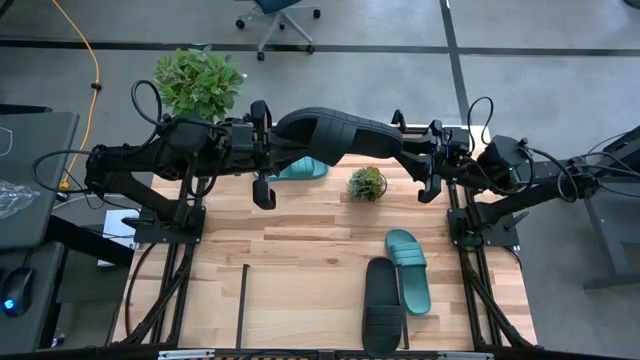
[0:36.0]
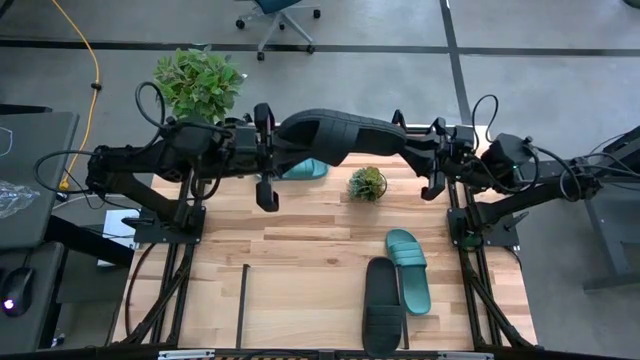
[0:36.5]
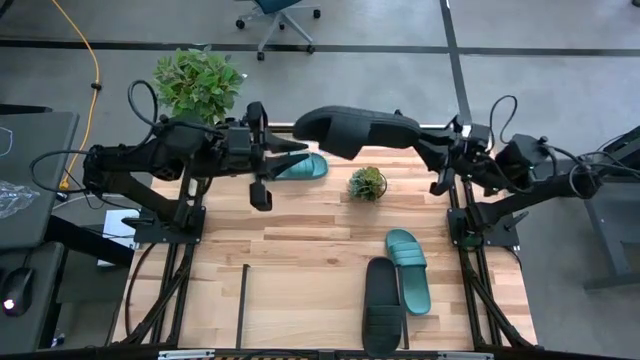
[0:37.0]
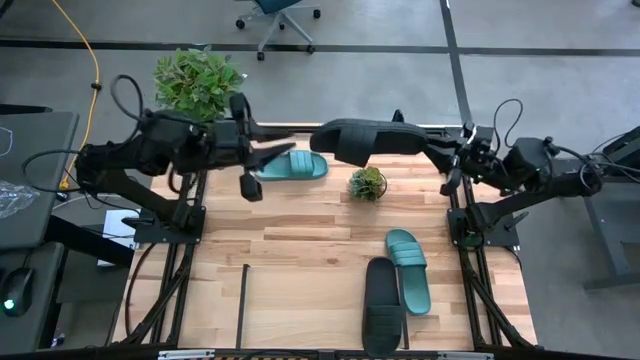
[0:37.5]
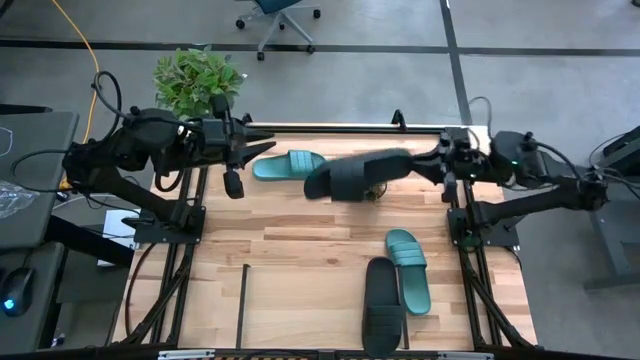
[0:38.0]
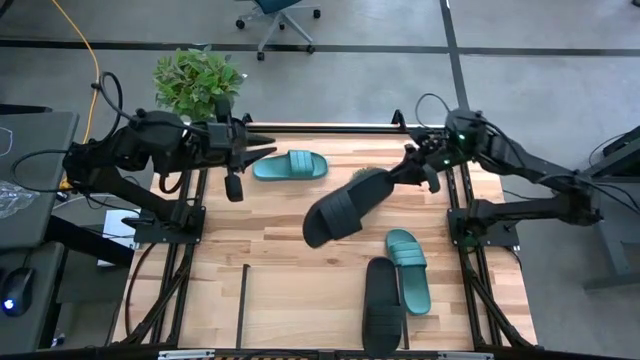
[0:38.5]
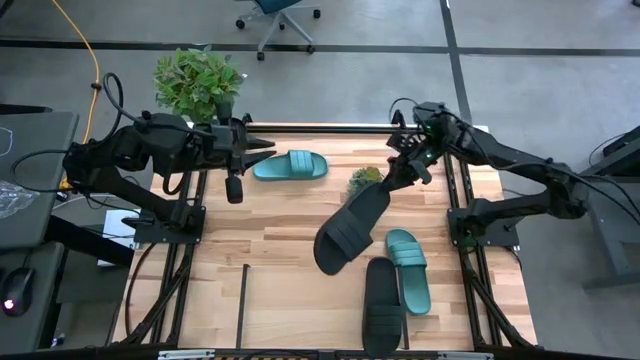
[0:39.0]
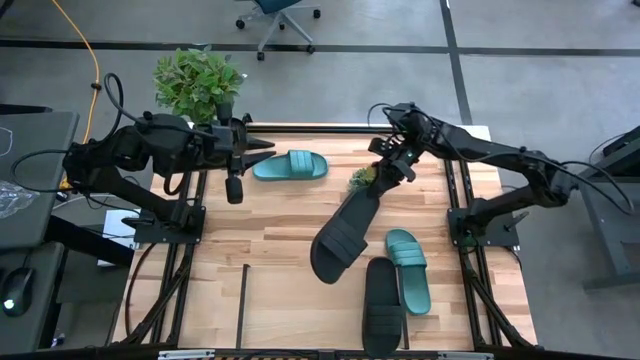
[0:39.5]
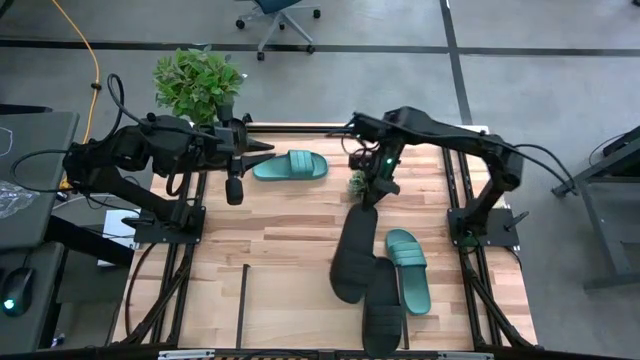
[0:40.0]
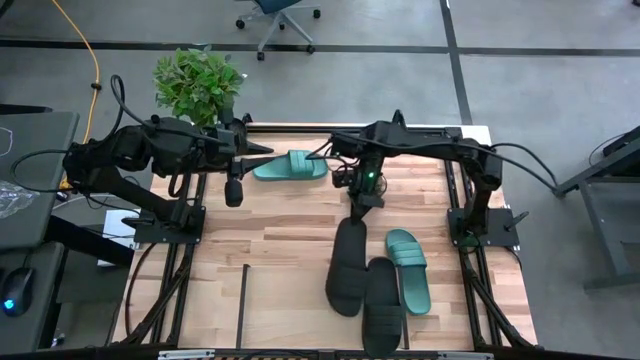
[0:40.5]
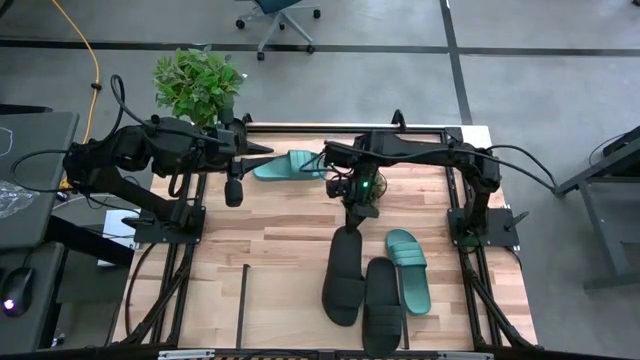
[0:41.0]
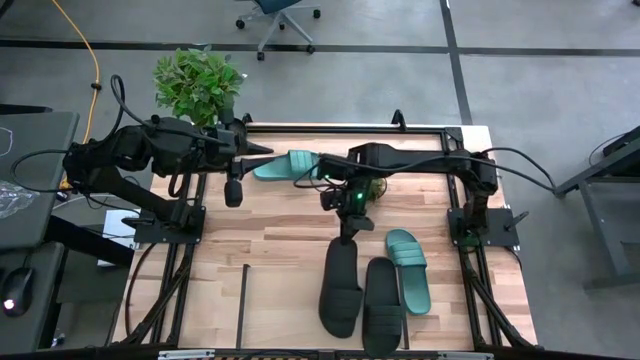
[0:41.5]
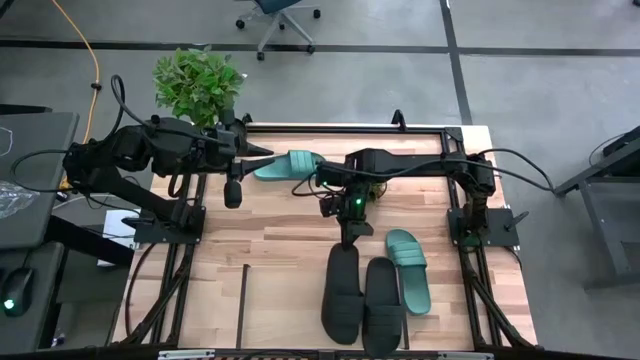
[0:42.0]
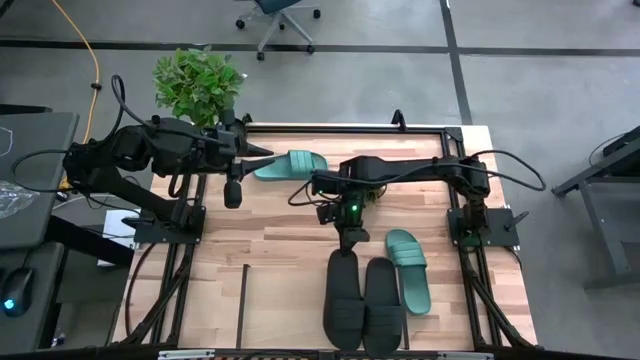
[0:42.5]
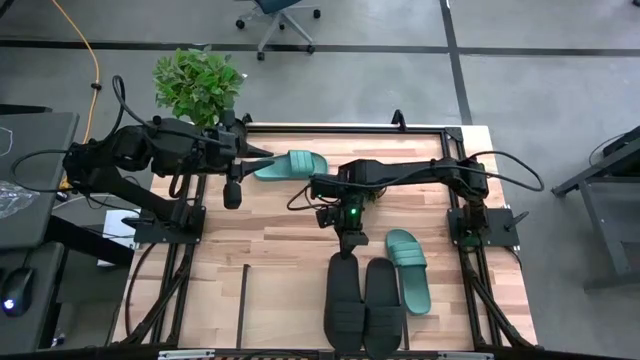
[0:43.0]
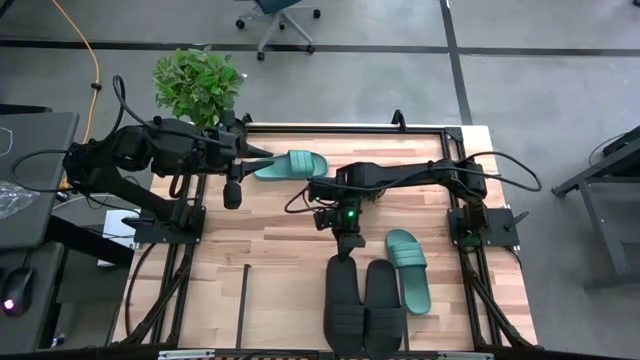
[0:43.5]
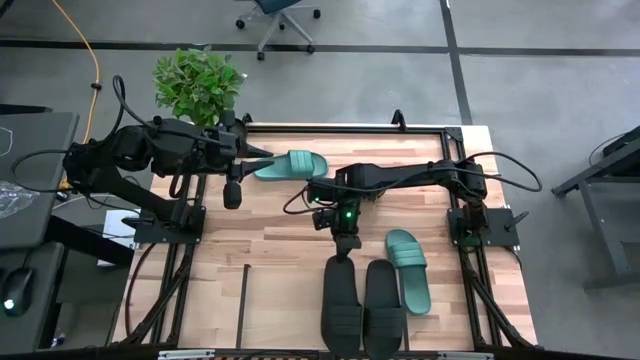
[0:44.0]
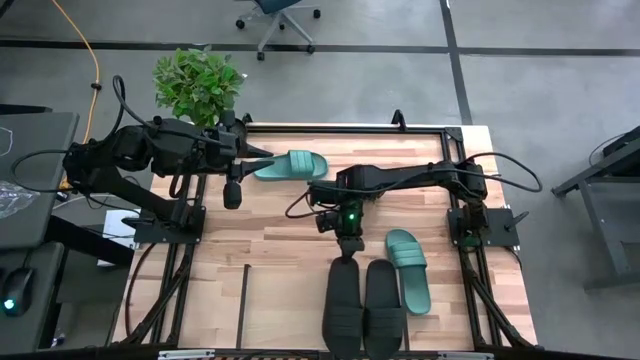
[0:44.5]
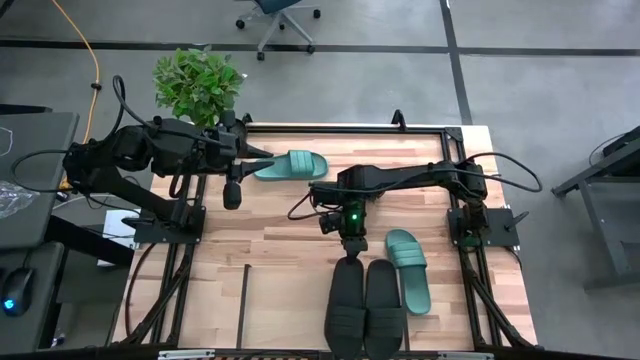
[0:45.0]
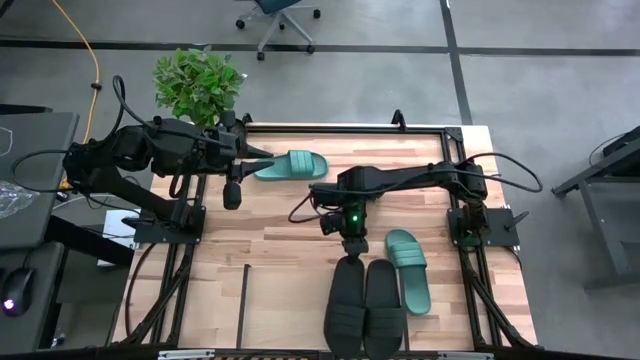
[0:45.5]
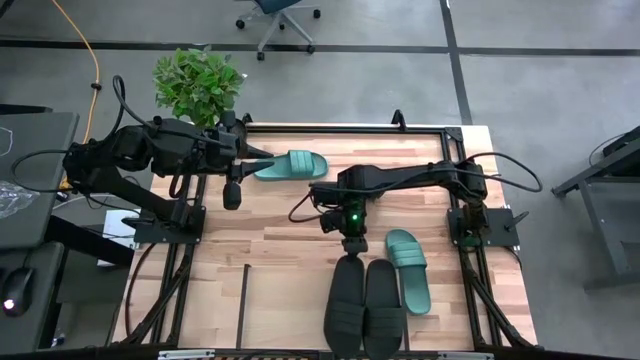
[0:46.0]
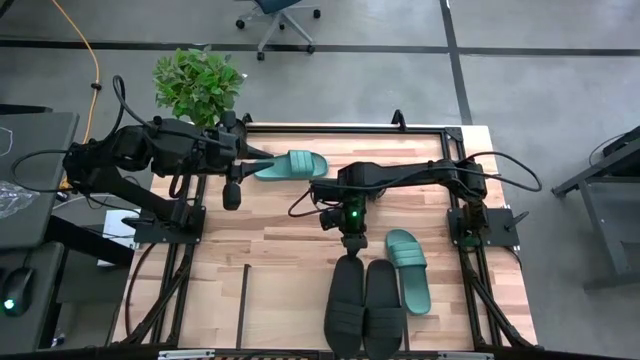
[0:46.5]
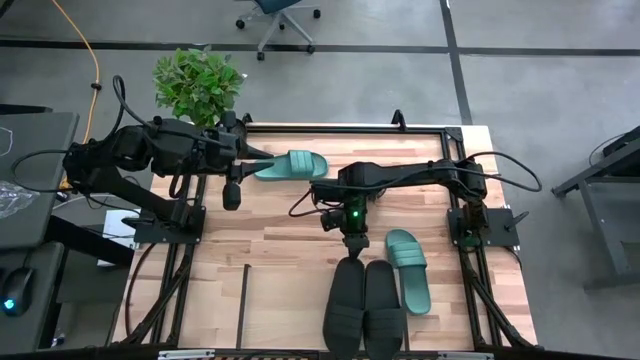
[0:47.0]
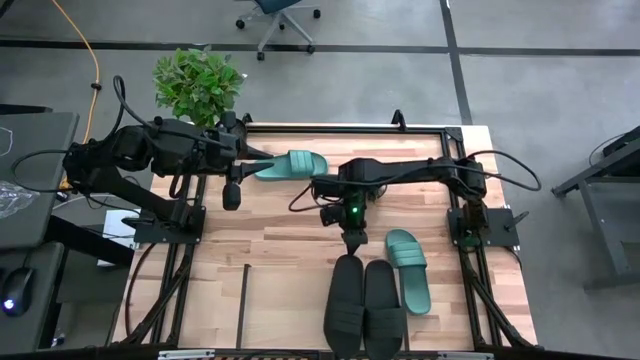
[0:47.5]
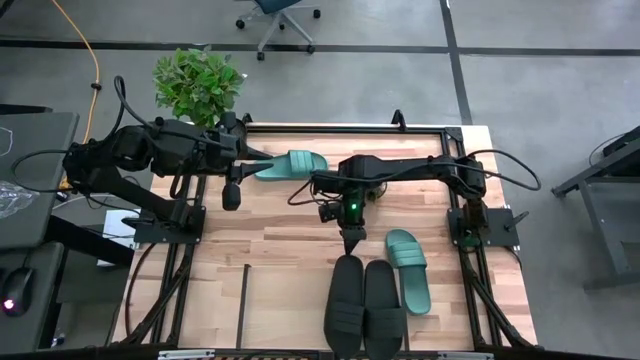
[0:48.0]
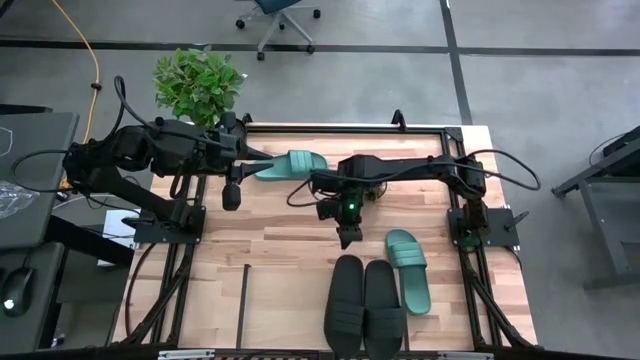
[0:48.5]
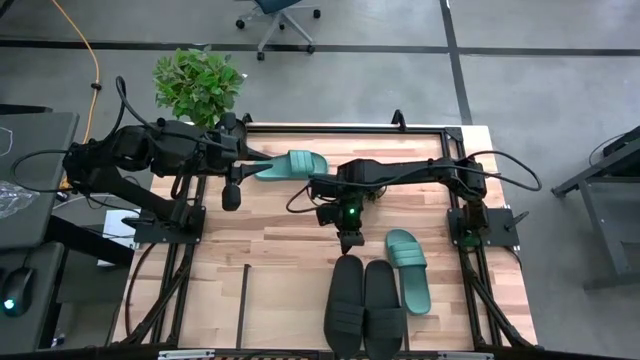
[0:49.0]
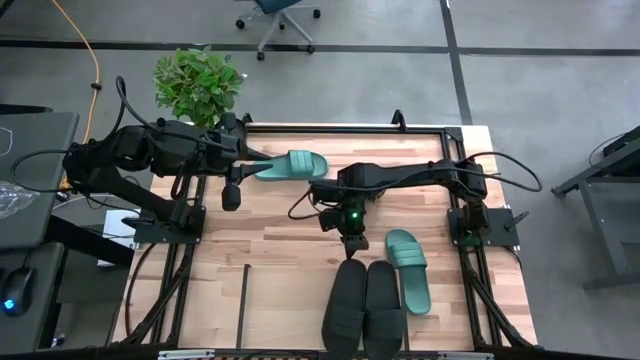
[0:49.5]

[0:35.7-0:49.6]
Task: Pick and place slides into the shelf
Put the black slide on the shelf

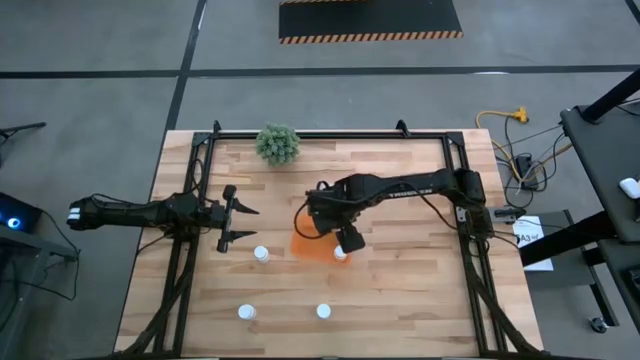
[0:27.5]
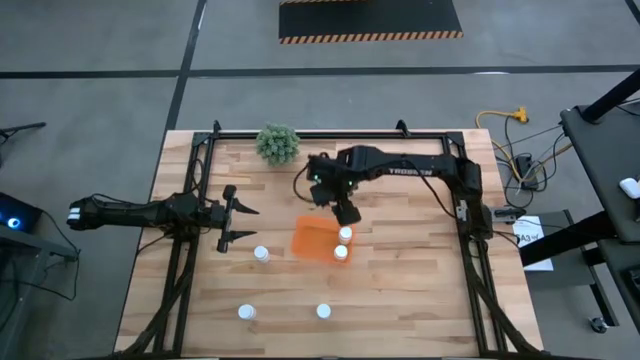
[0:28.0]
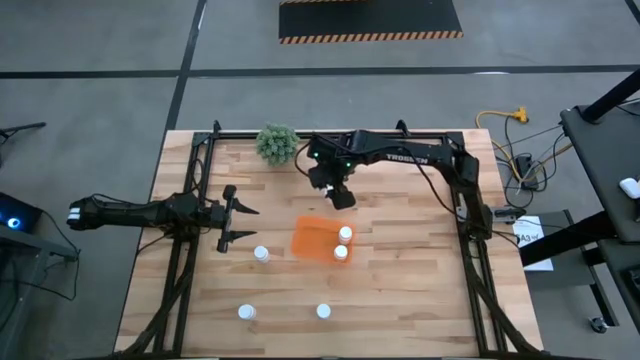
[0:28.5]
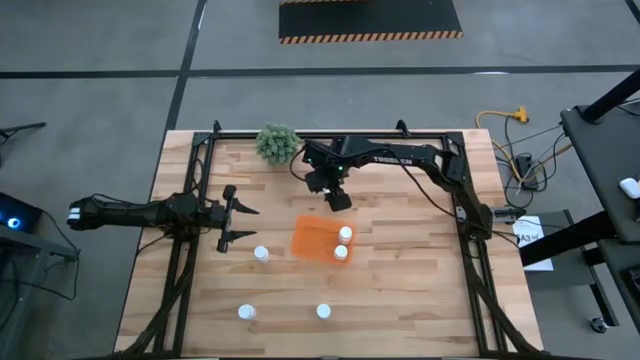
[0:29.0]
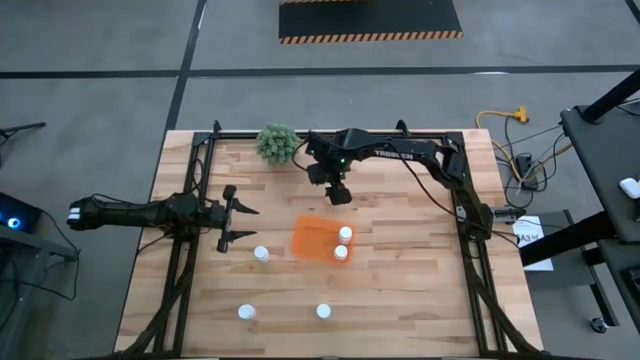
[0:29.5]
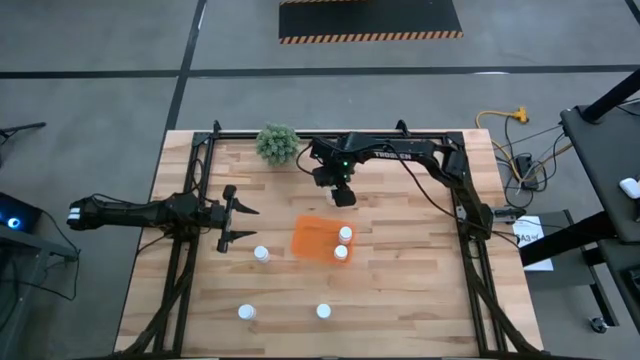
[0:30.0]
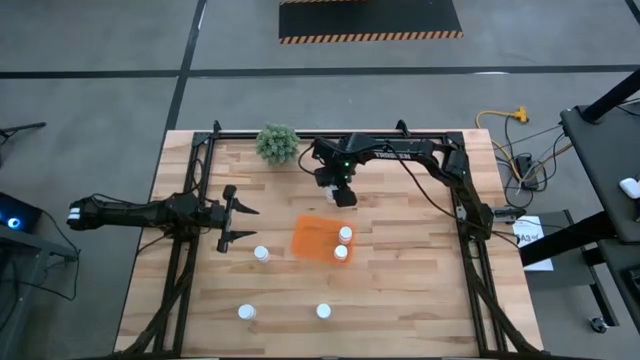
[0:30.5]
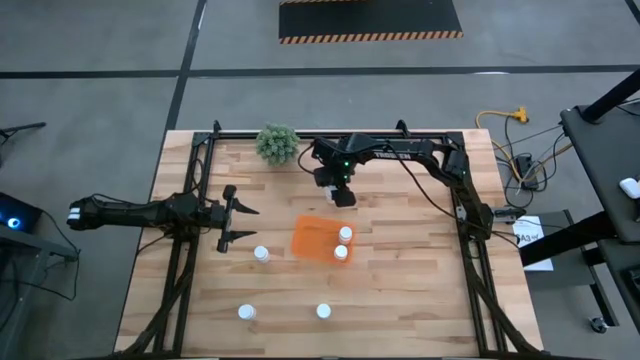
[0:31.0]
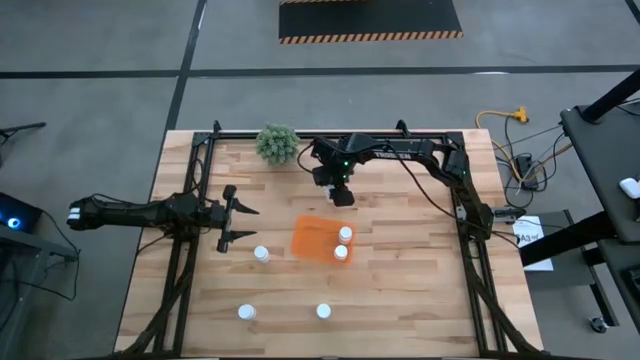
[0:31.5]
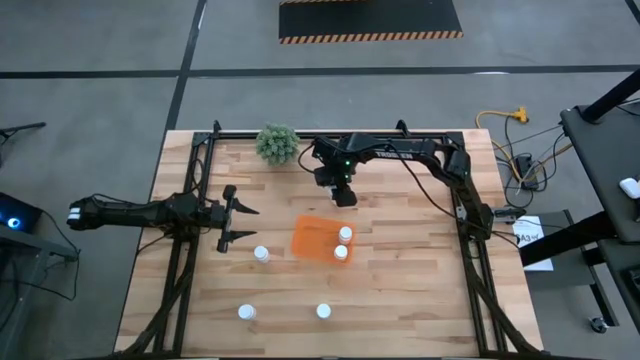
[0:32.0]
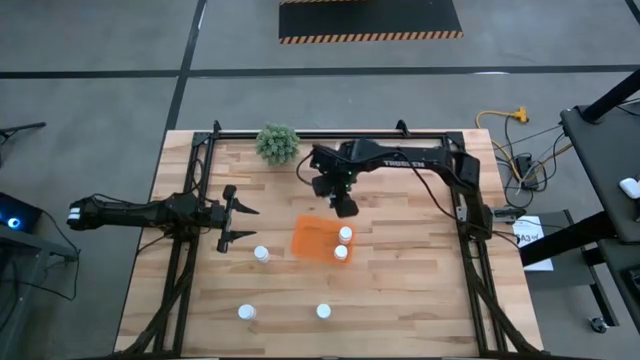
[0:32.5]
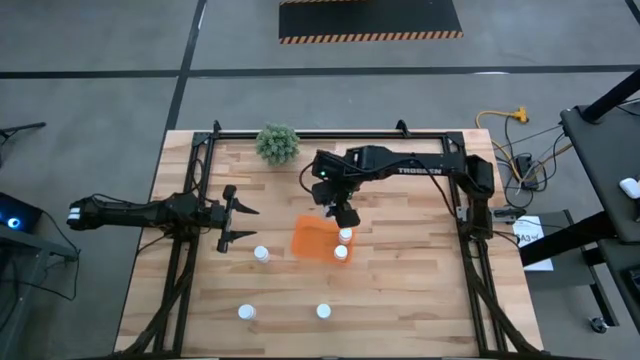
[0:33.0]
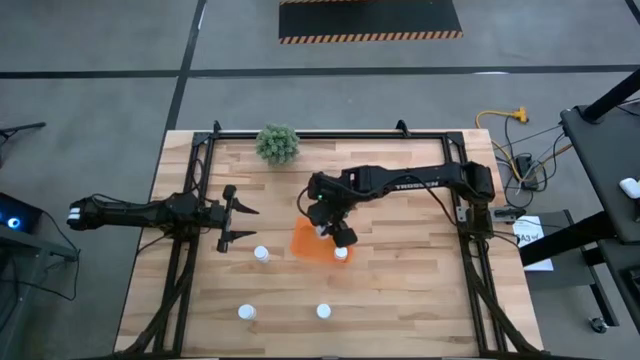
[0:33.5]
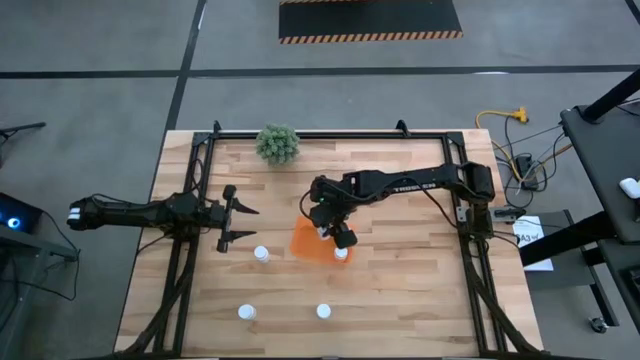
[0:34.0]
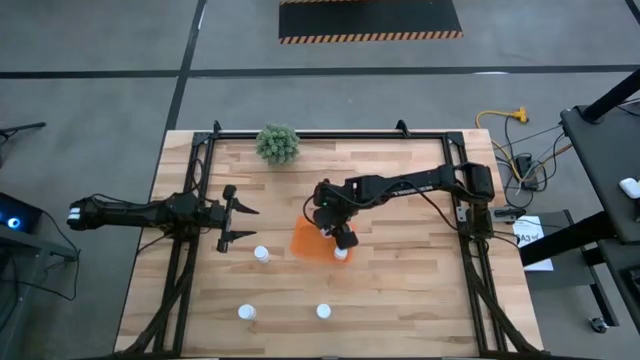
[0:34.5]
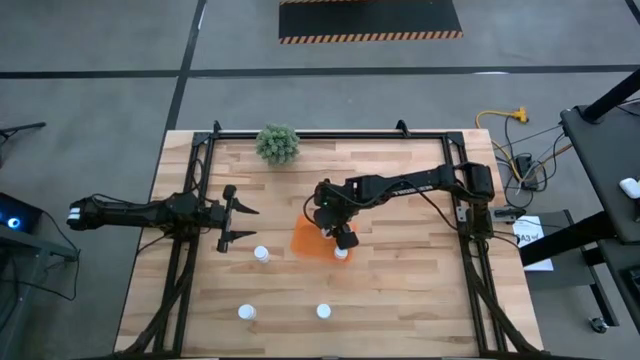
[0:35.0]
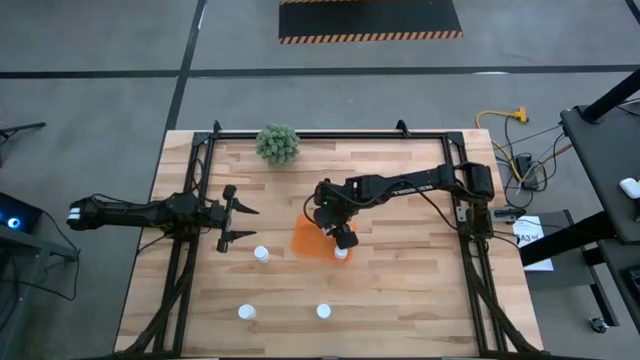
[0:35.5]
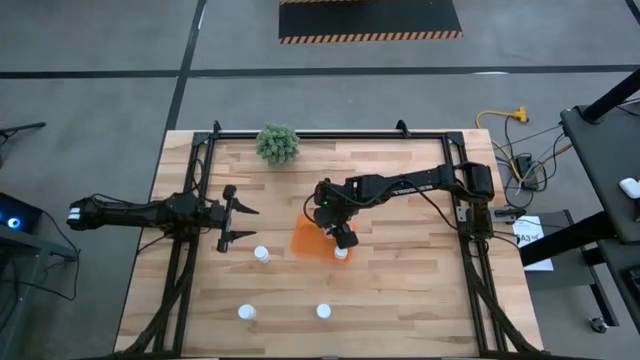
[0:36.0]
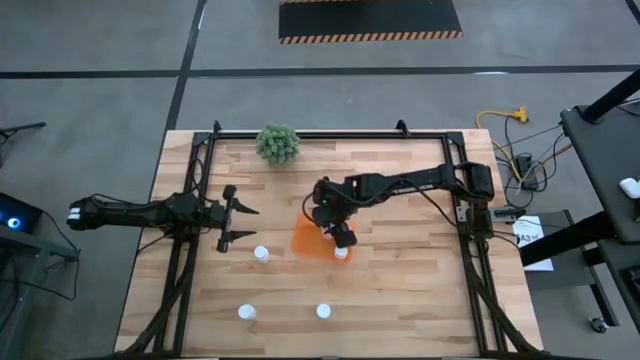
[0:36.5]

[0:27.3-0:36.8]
Task: Pick and place pill bottles into a basket
Put the pill bottle into the bin
